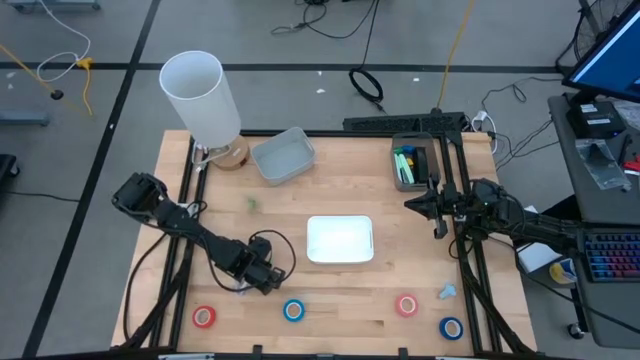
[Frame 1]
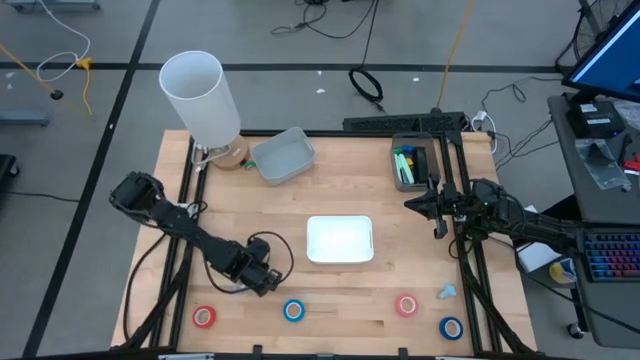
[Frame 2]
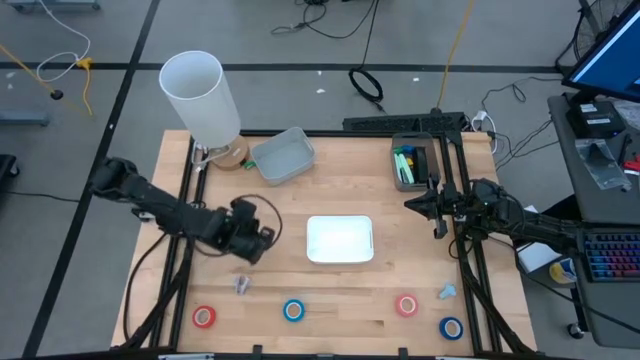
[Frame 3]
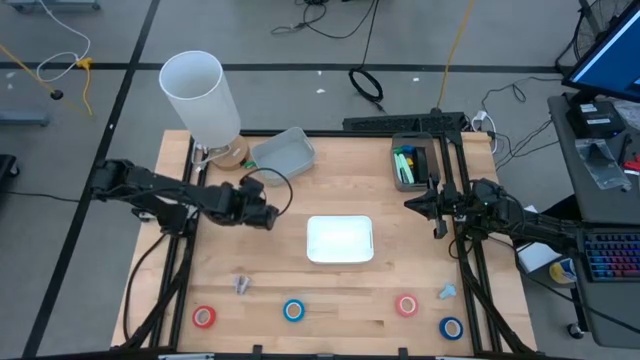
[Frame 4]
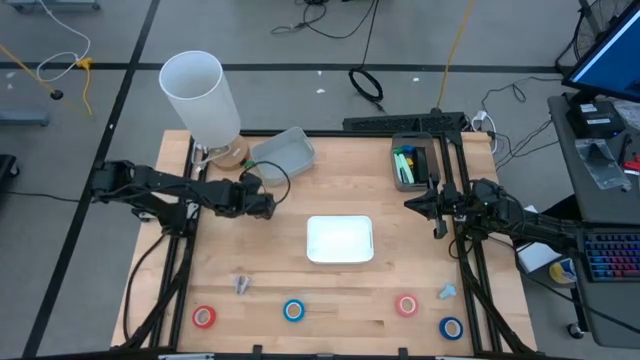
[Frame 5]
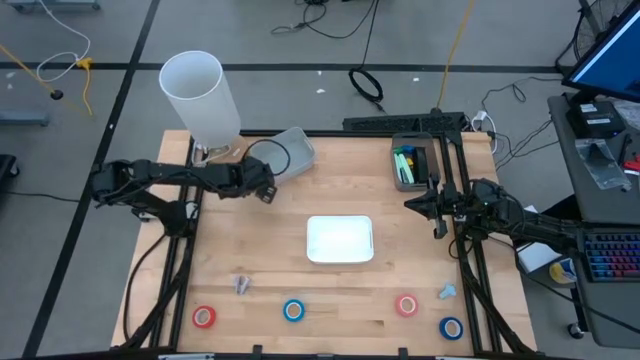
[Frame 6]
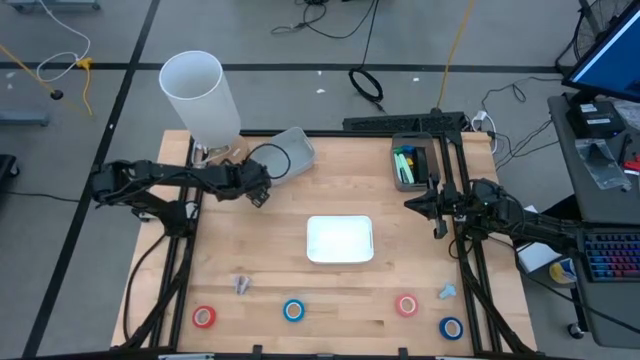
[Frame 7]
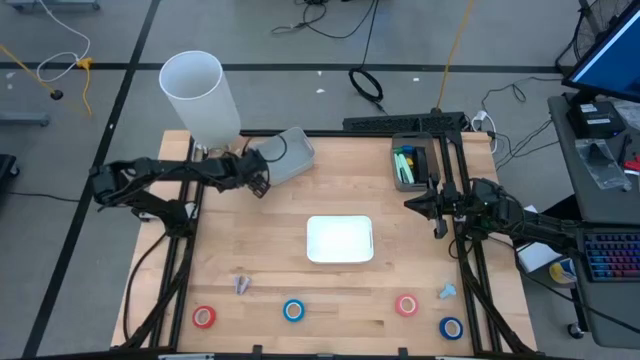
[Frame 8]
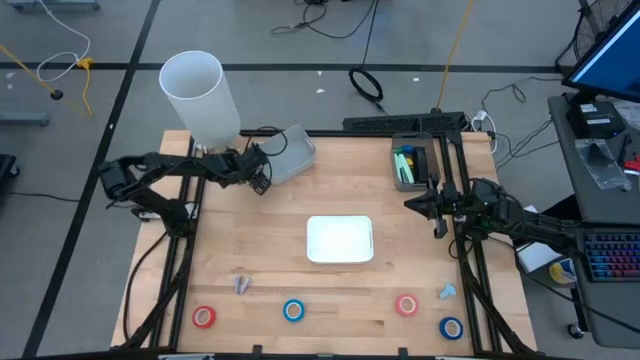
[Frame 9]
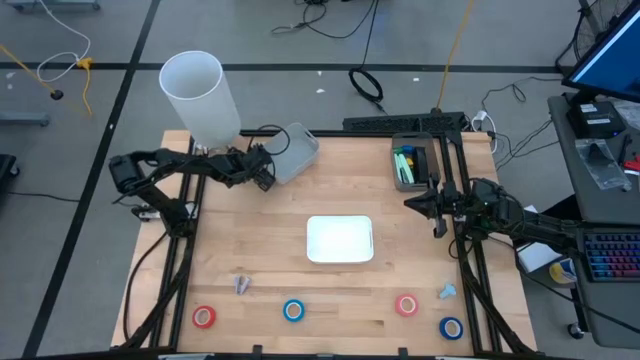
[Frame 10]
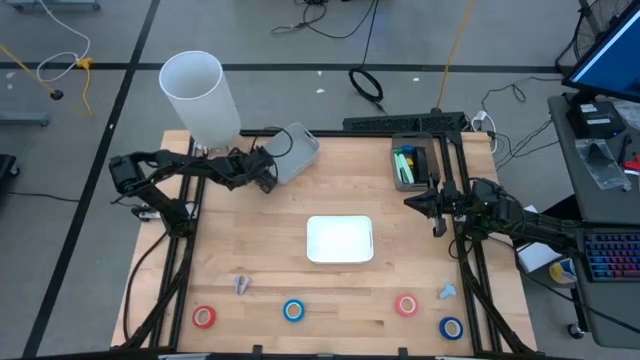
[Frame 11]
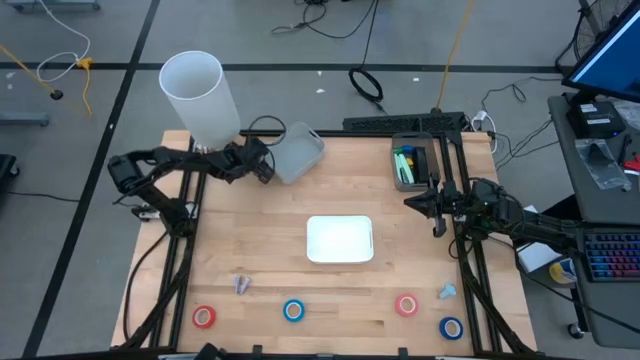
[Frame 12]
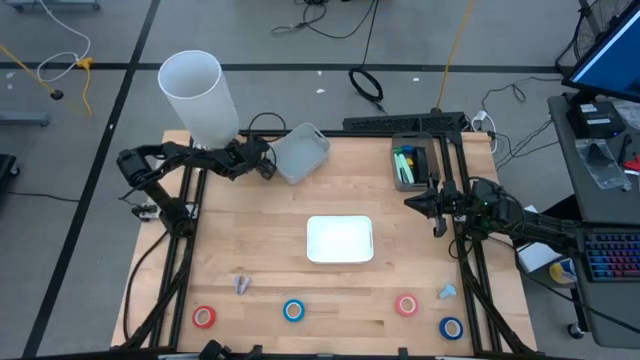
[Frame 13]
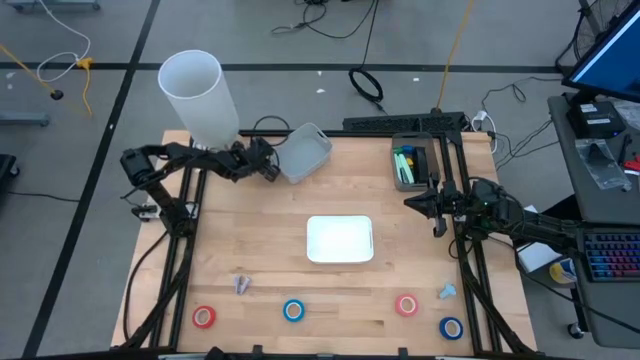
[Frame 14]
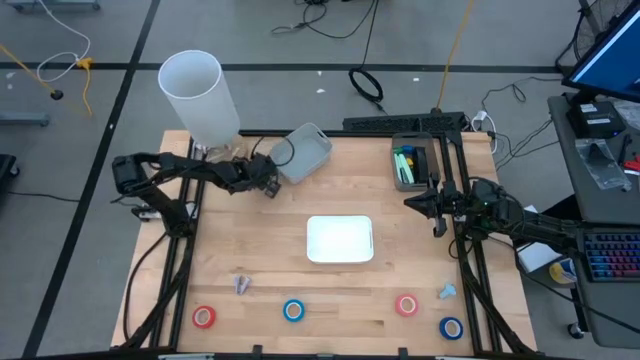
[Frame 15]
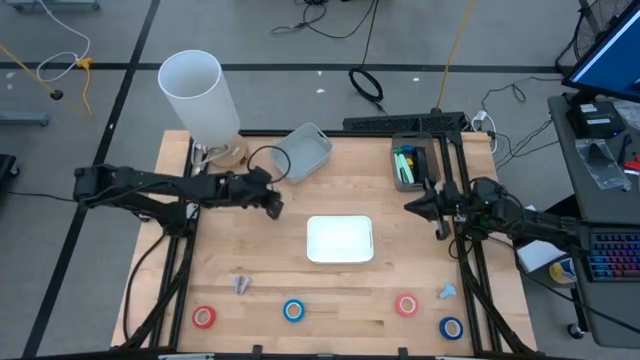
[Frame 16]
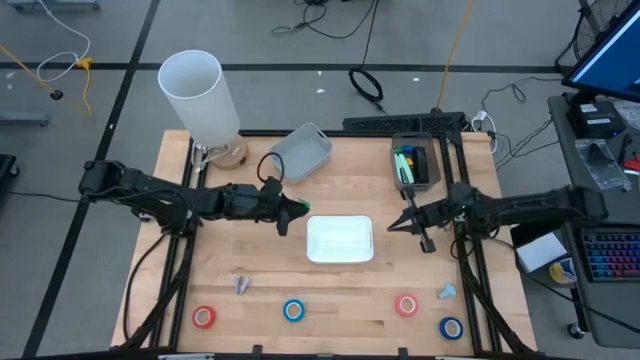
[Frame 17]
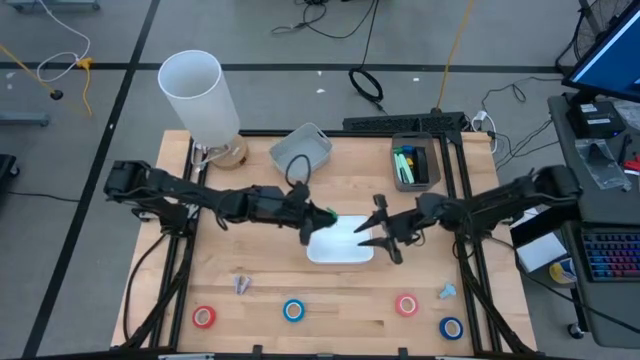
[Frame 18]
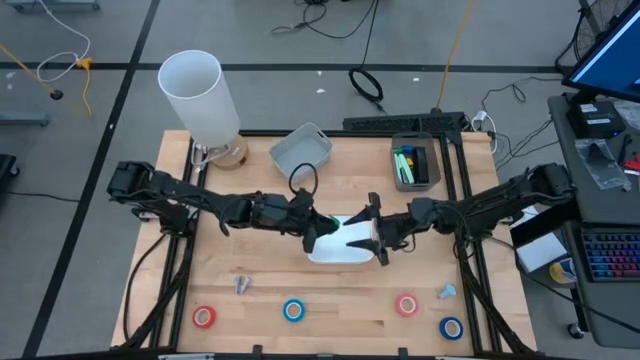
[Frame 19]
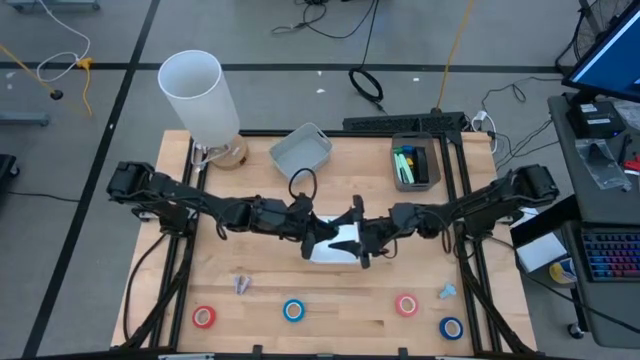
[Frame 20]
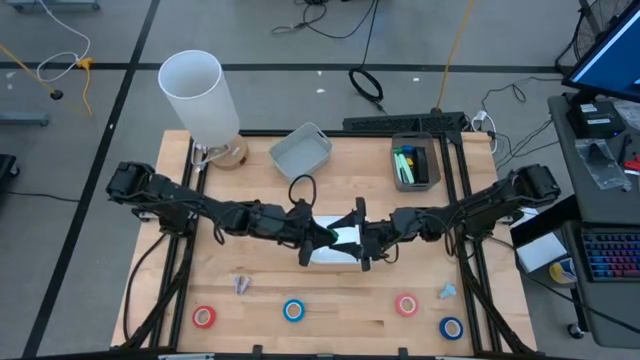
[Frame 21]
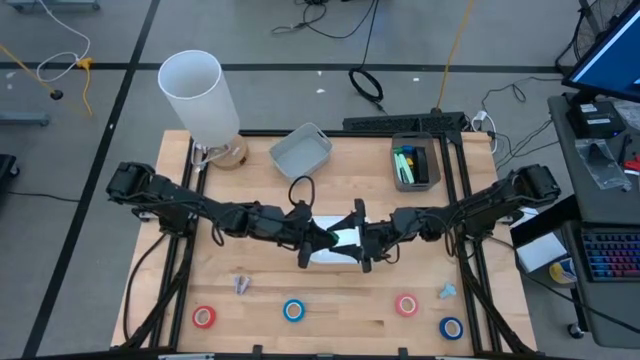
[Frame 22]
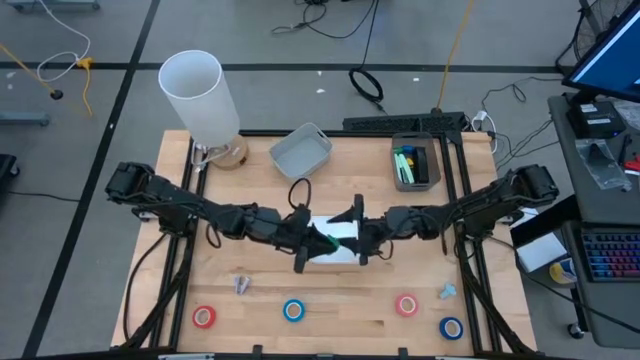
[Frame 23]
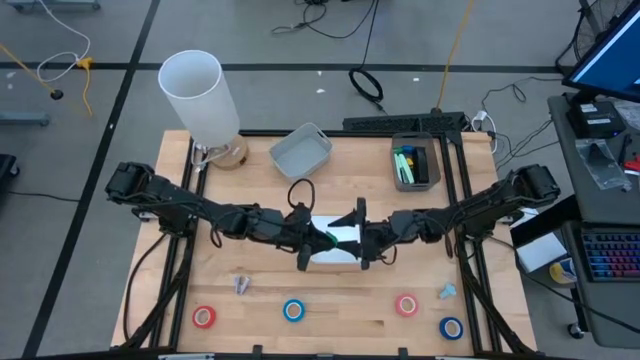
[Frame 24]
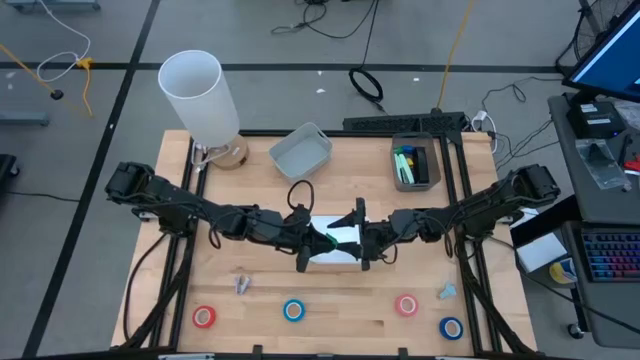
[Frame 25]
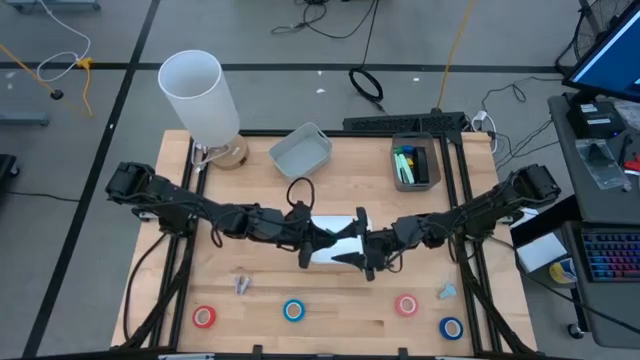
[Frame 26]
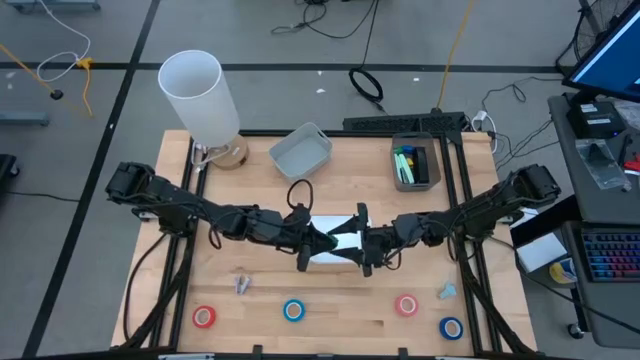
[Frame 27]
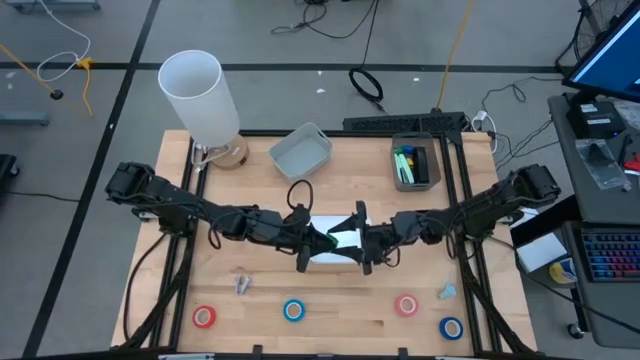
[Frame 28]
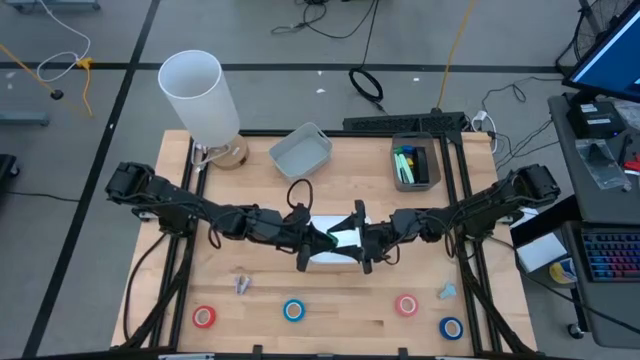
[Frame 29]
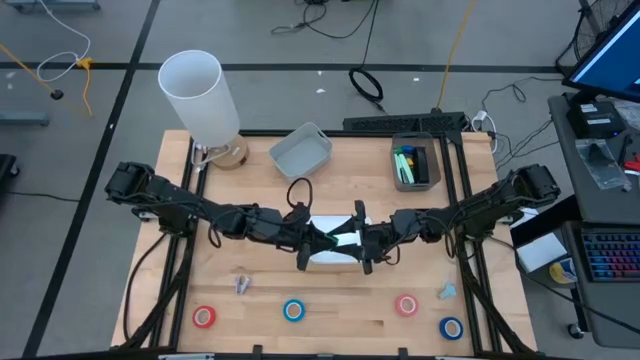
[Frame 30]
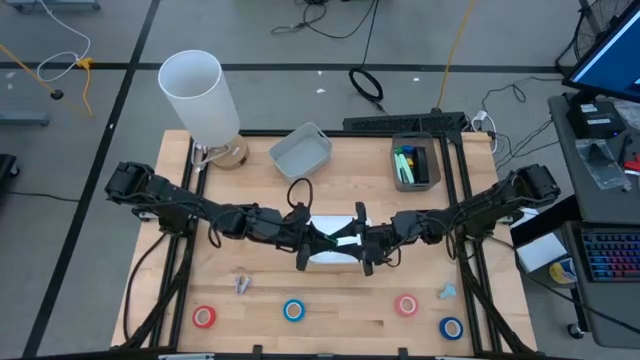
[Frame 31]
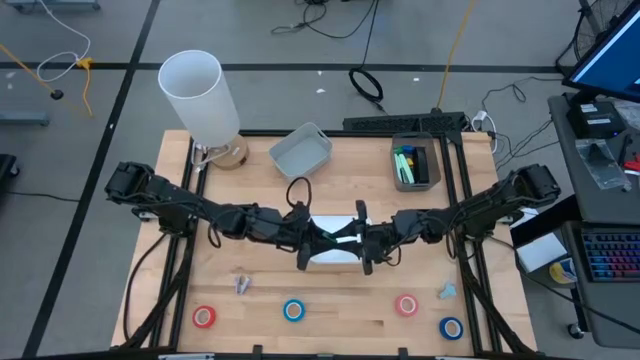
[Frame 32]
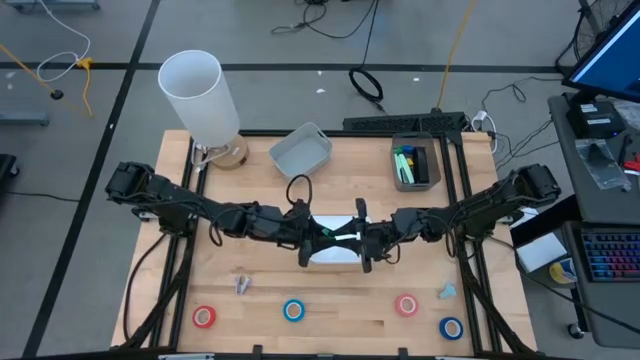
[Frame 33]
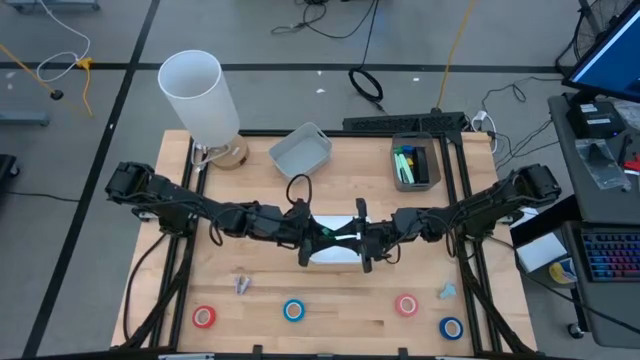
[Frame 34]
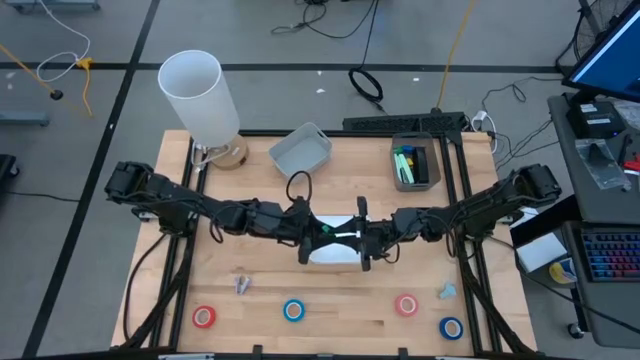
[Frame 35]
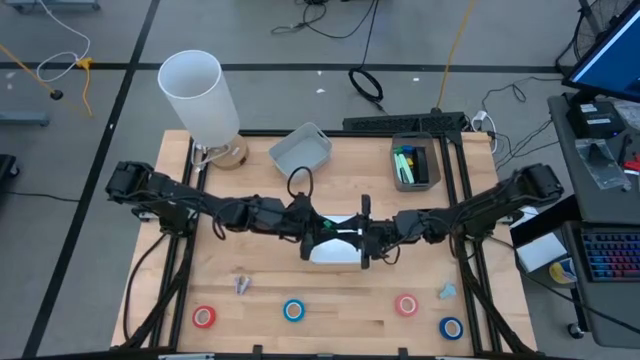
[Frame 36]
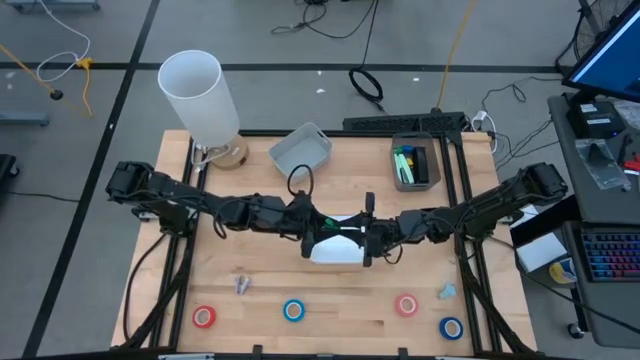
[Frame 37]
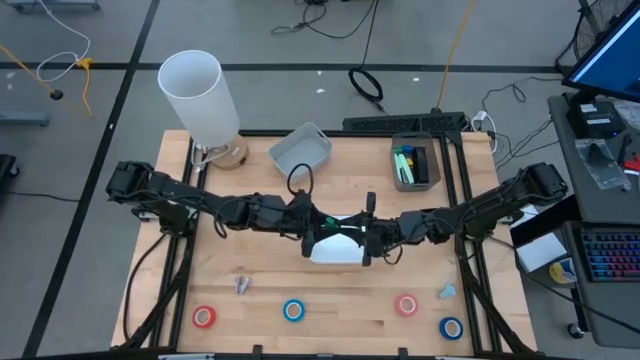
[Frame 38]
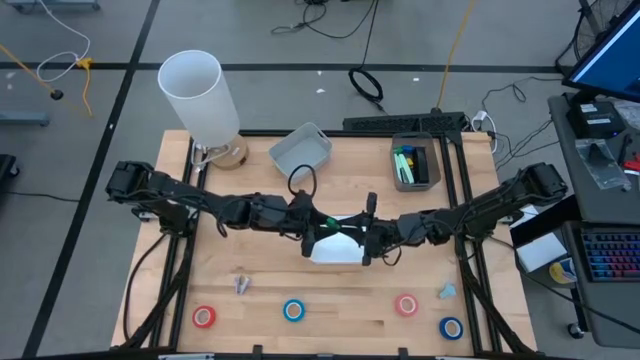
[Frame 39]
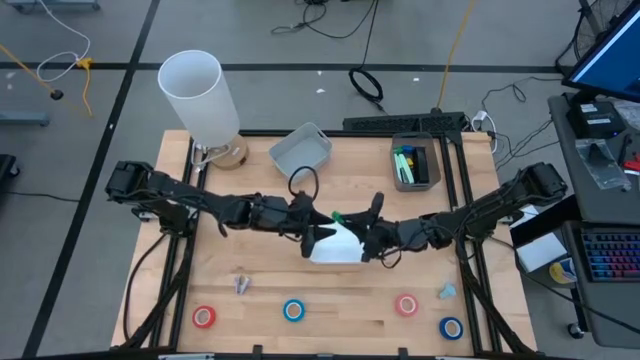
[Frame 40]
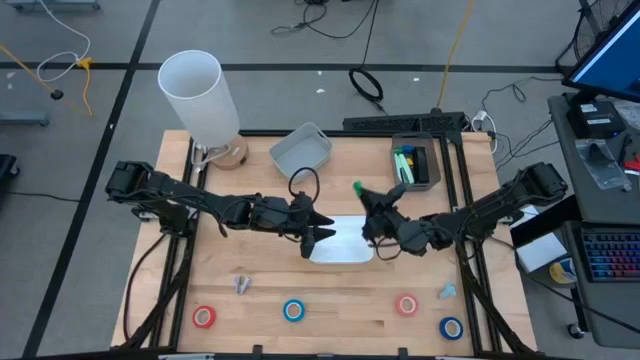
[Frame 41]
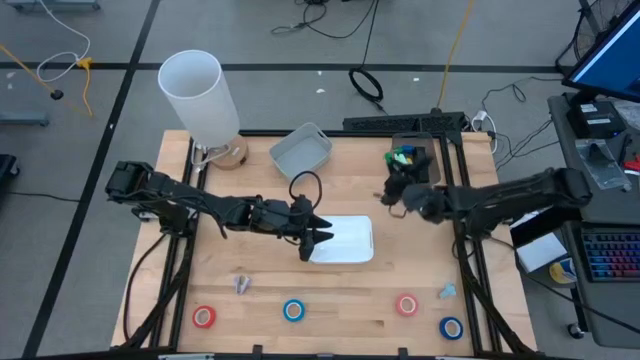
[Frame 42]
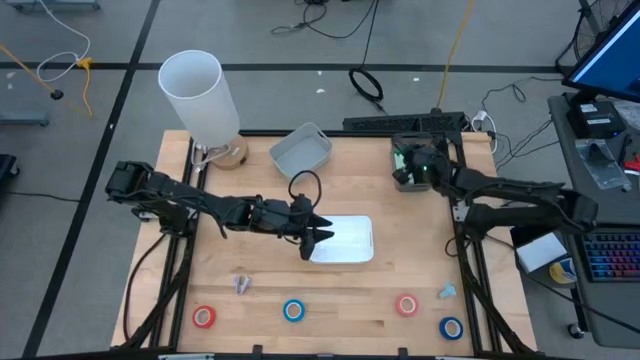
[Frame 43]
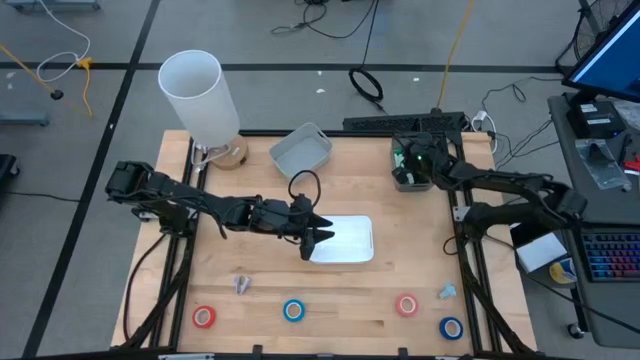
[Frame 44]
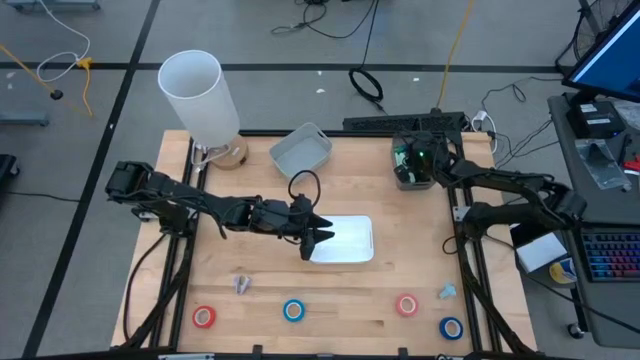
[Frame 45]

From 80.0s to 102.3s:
Task: Pick and place Stapler, Stapler remover, tape
Put the green stapler into the black bin
